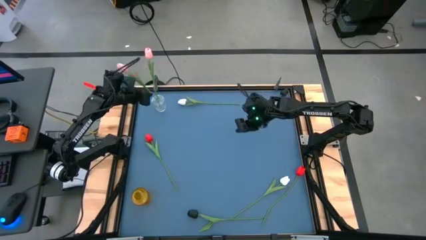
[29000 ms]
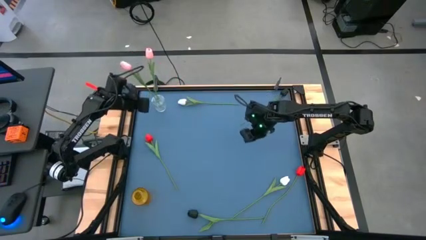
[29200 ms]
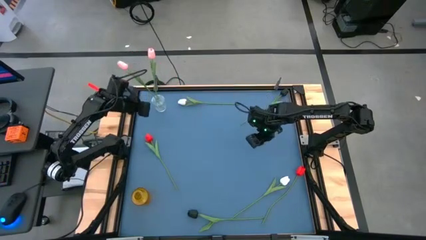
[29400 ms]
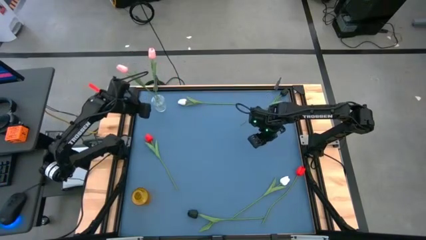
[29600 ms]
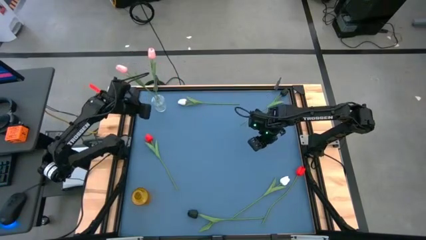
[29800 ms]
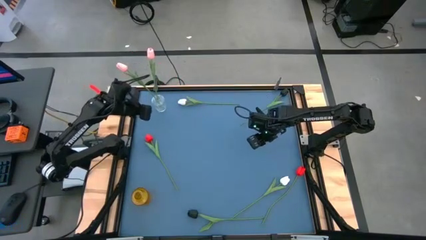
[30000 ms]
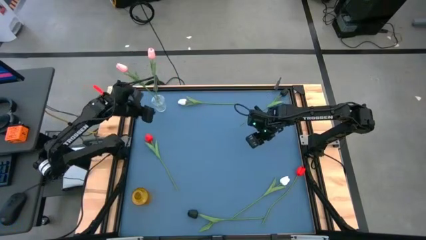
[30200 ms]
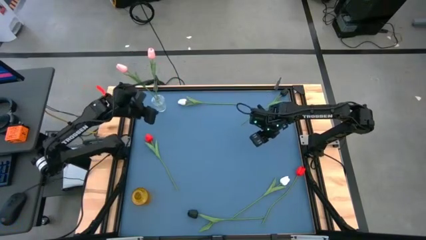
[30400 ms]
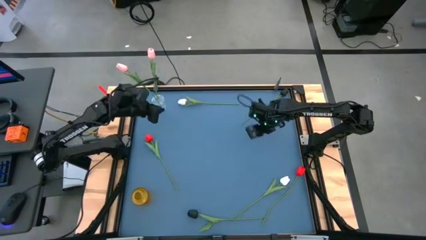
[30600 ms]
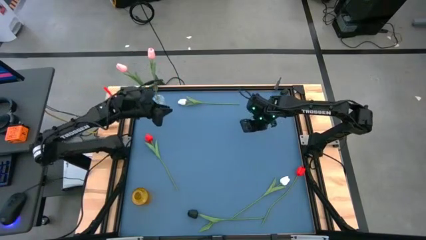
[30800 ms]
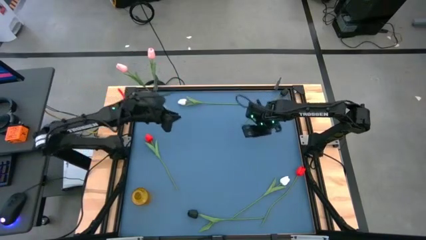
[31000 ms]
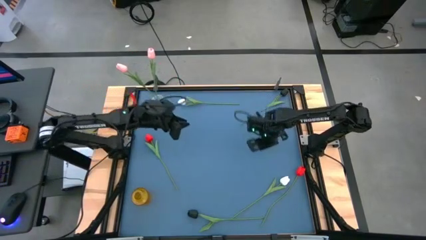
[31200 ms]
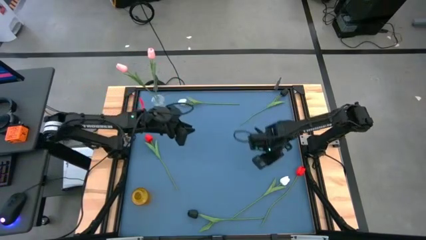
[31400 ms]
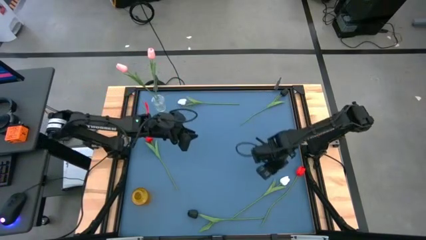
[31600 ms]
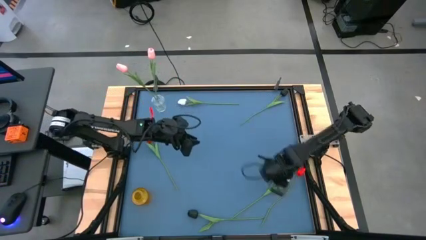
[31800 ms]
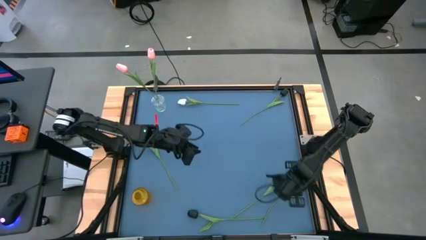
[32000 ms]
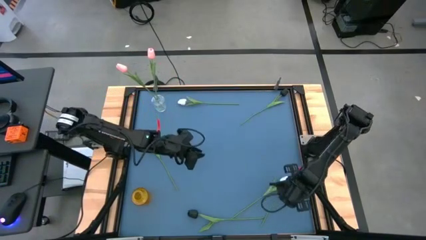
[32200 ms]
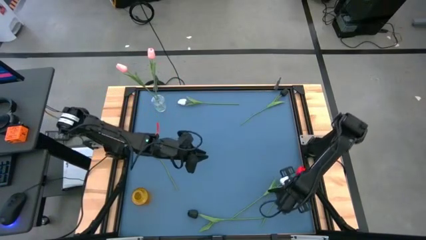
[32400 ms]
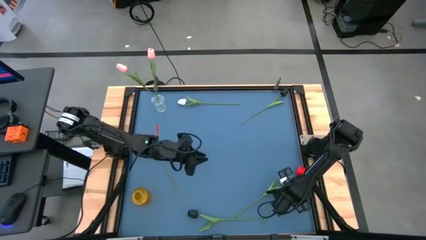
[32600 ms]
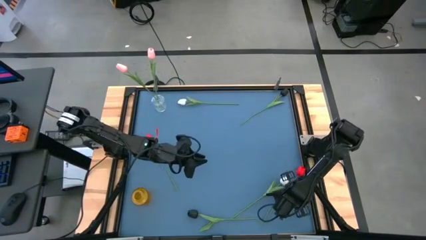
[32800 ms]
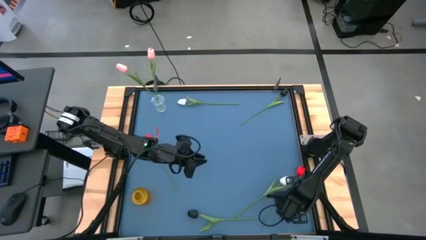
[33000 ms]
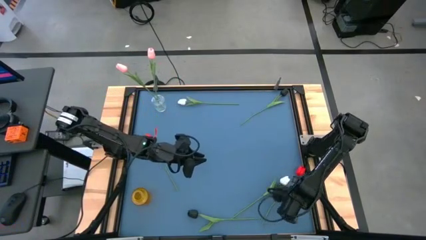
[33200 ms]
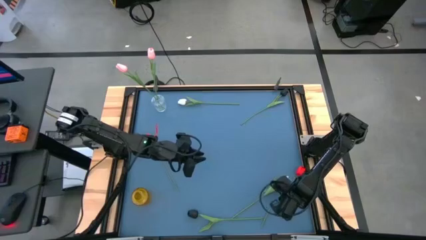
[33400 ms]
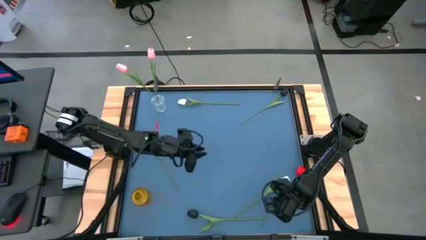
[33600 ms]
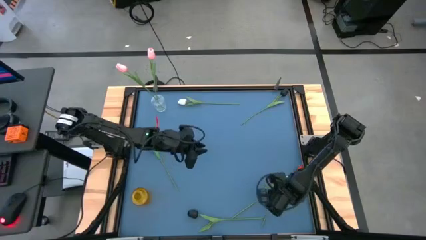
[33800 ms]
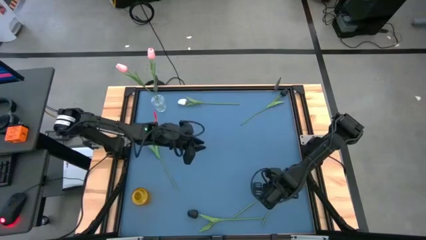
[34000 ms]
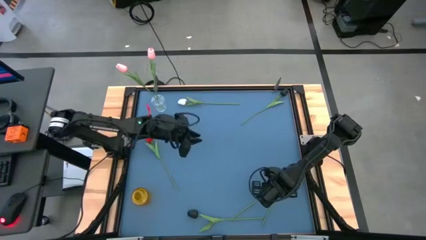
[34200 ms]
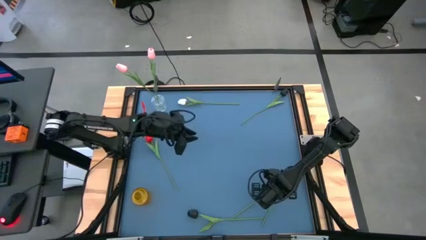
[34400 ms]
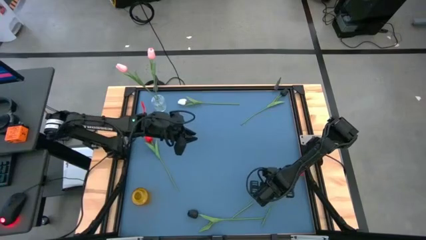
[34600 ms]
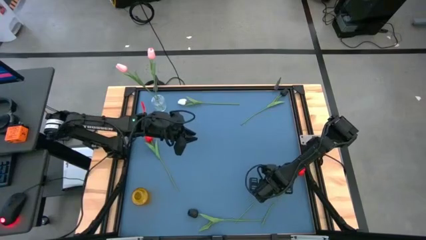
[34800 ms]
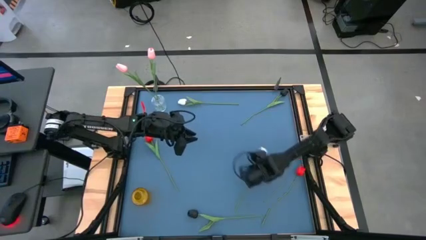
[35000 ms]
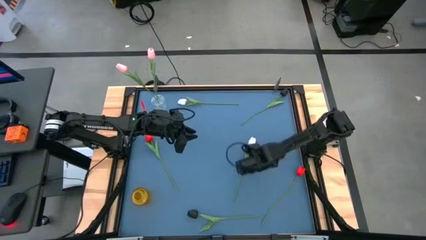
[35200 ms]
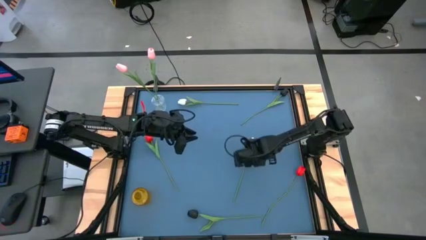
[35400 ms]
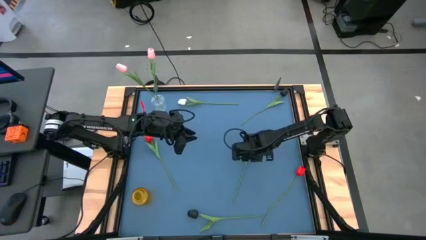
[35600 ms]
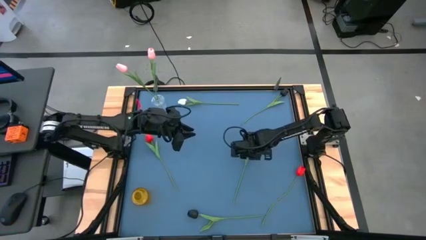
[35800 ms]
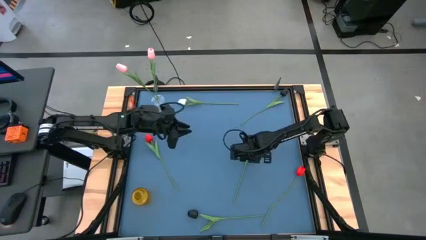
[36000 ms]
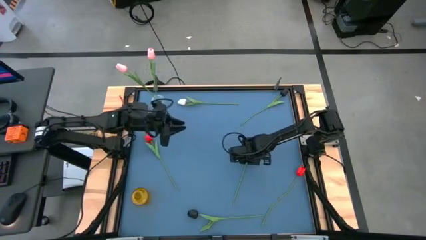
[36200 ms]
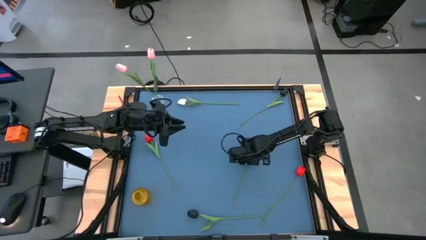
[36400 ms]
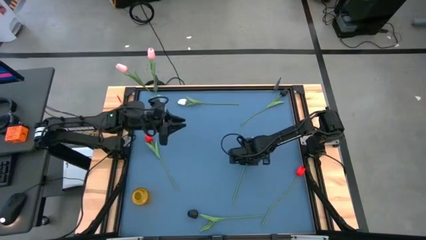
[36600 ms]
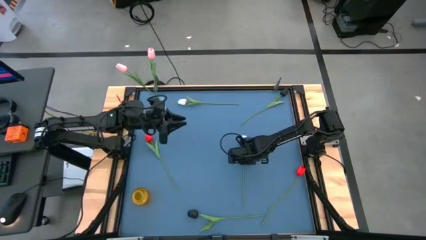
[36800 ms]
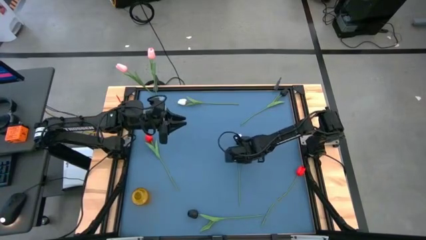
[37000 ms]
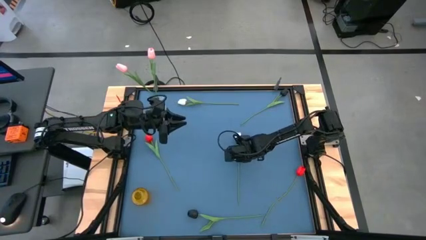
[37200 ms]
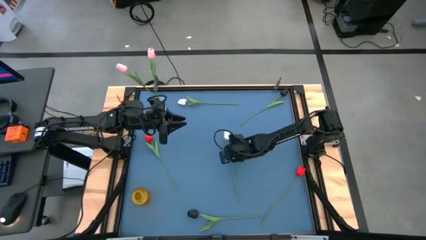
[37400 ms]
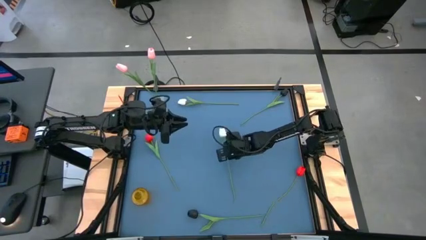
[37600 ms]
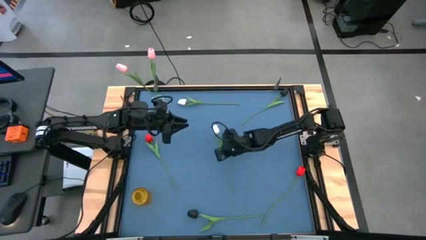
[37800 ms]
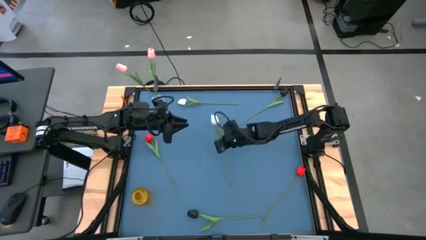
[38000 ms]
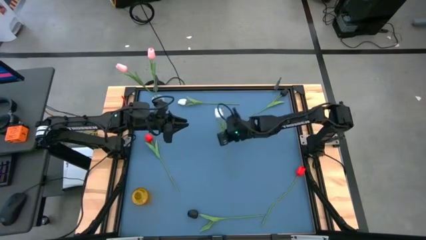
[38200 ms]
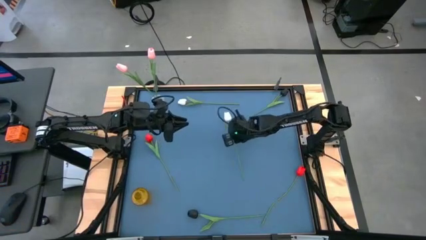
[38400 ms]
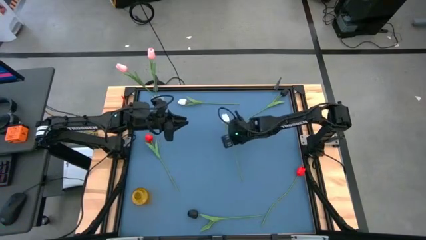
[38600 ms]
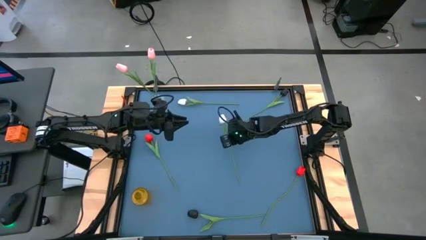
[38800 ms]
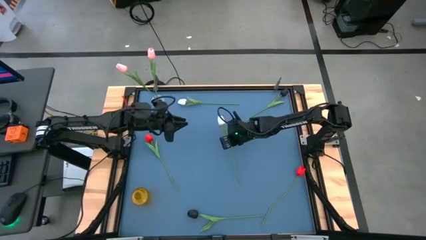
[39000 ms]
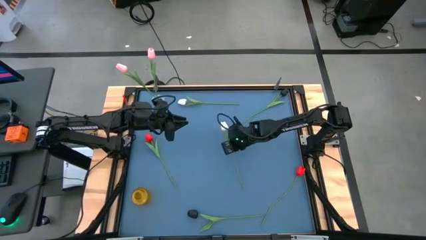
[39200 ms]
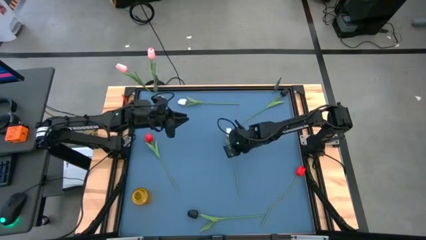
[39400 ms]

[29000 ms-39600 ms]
Task: Sort flowers into vase by color
Put the bottom white tulip into the yellow vase
